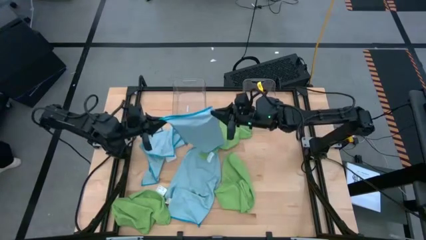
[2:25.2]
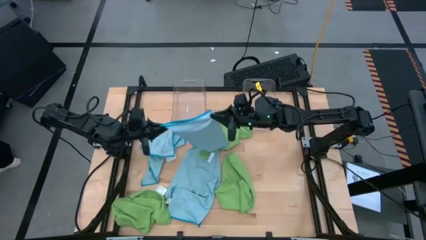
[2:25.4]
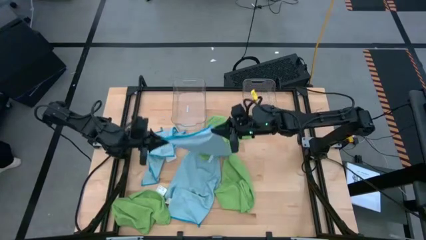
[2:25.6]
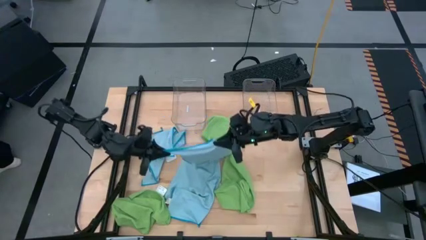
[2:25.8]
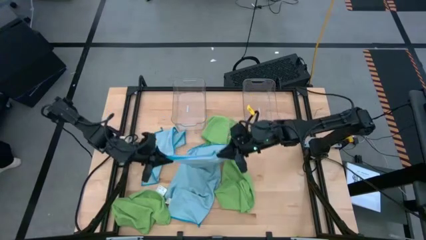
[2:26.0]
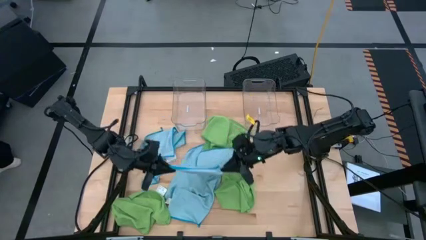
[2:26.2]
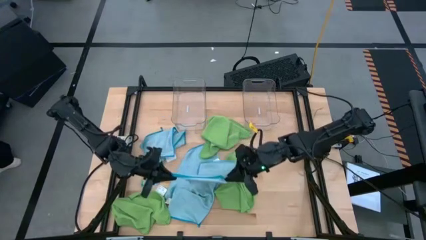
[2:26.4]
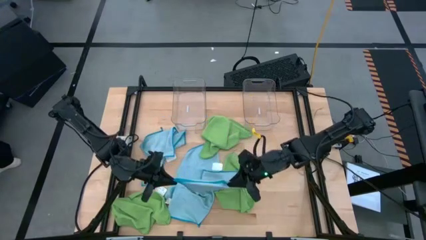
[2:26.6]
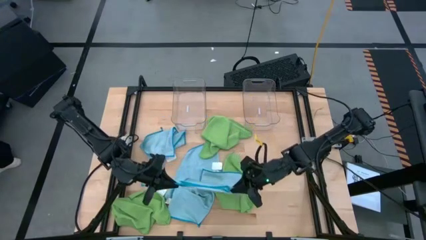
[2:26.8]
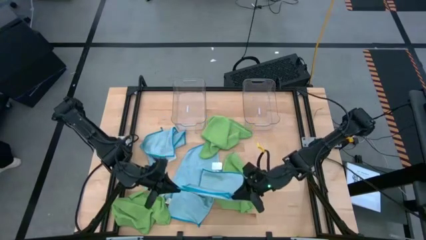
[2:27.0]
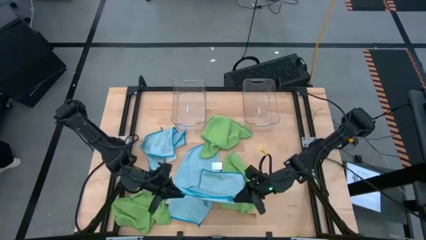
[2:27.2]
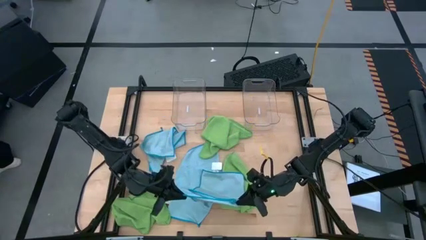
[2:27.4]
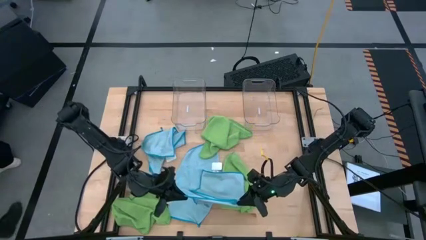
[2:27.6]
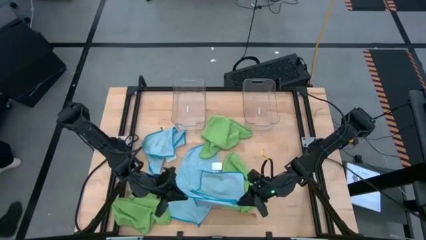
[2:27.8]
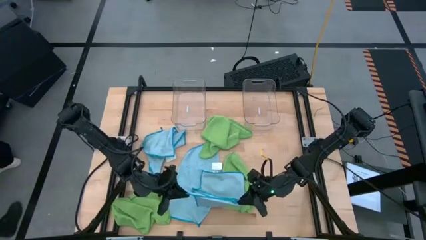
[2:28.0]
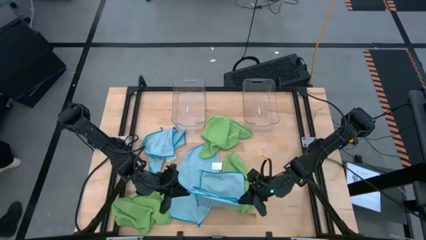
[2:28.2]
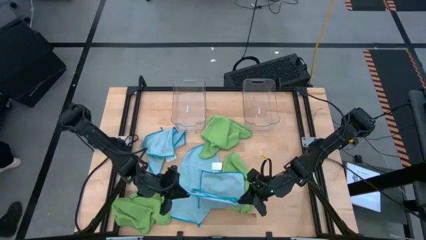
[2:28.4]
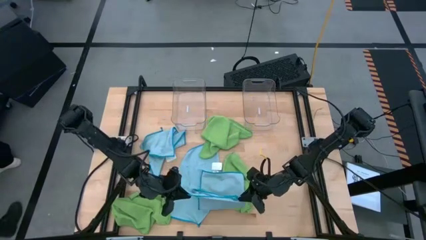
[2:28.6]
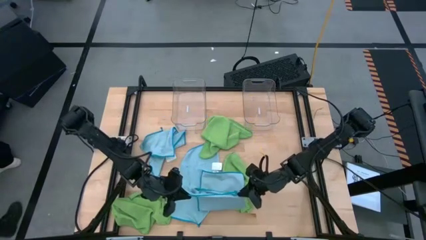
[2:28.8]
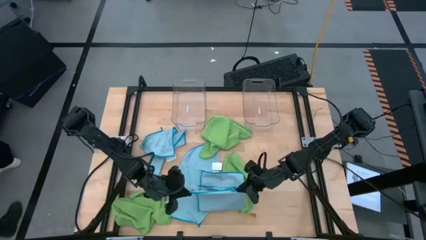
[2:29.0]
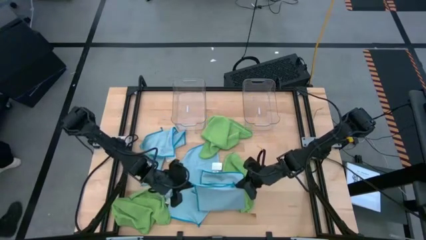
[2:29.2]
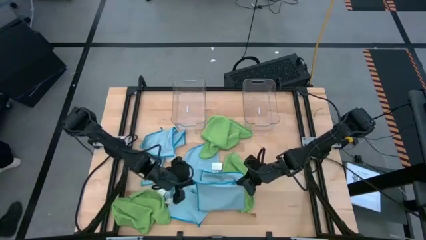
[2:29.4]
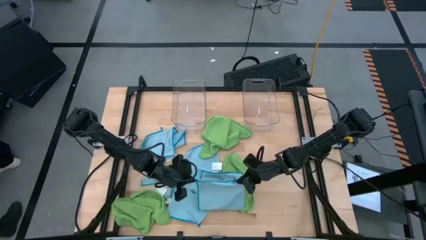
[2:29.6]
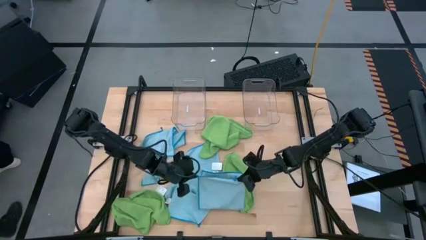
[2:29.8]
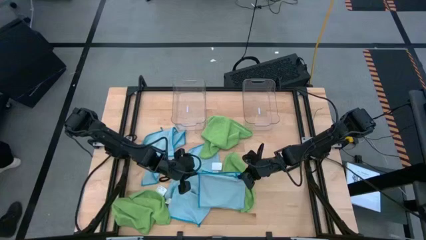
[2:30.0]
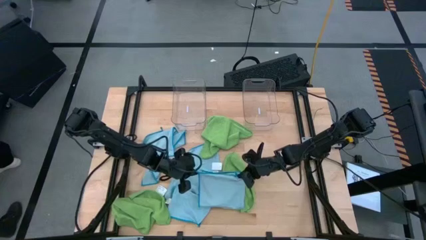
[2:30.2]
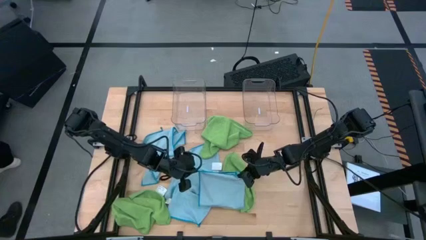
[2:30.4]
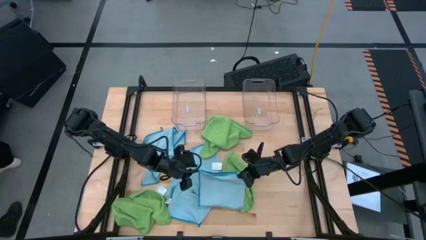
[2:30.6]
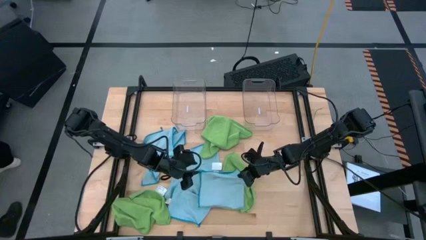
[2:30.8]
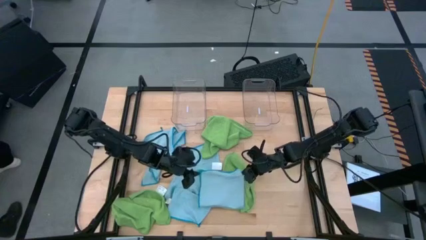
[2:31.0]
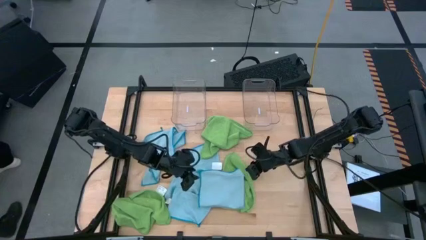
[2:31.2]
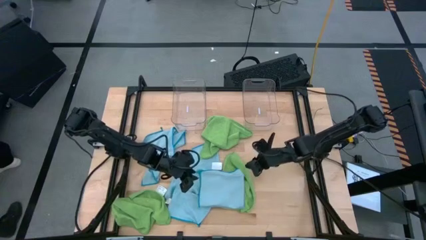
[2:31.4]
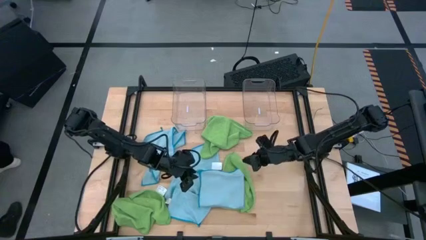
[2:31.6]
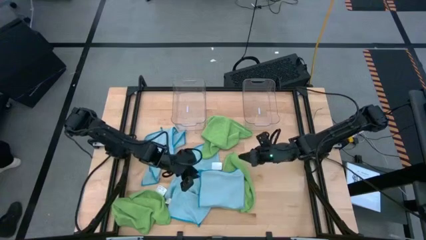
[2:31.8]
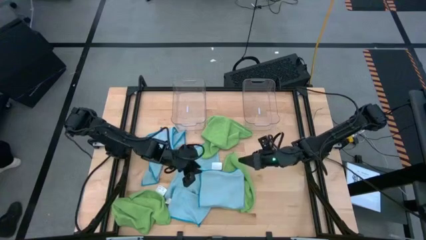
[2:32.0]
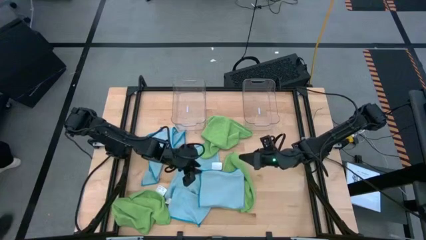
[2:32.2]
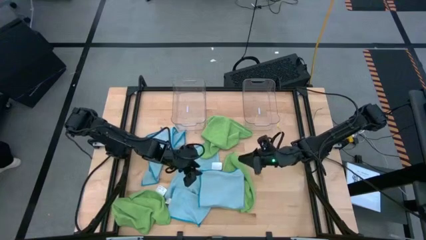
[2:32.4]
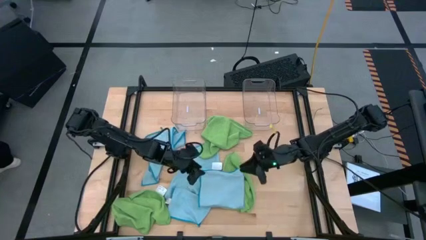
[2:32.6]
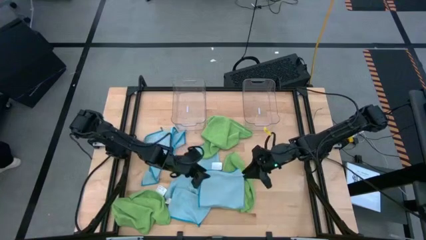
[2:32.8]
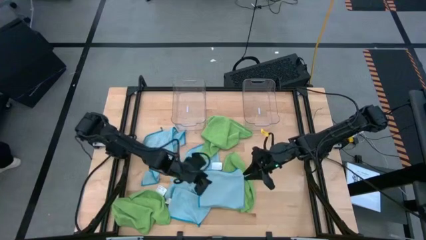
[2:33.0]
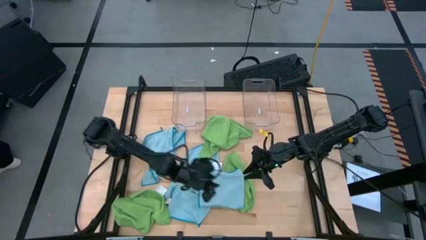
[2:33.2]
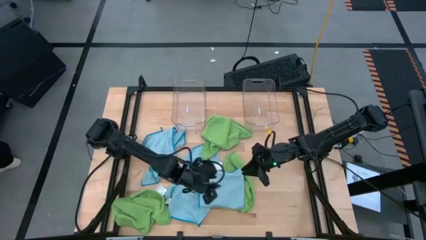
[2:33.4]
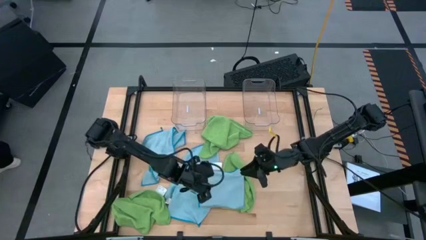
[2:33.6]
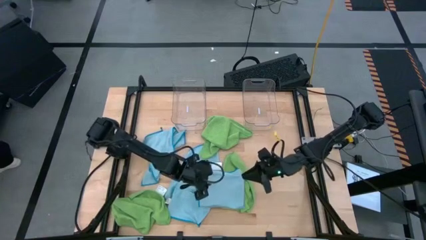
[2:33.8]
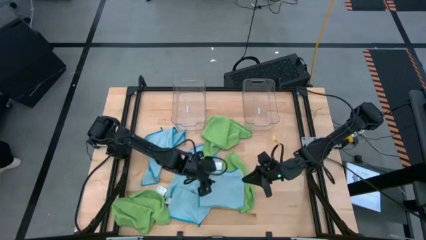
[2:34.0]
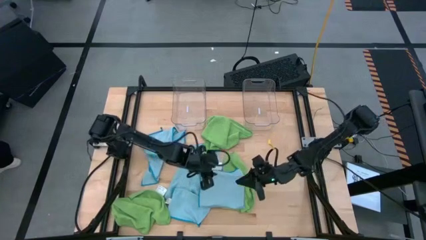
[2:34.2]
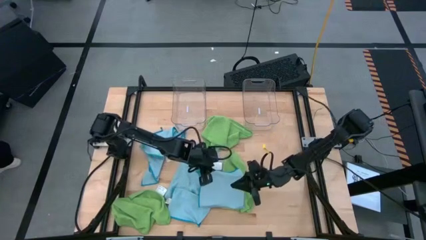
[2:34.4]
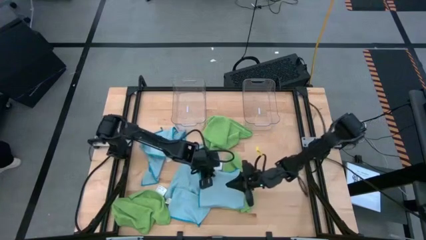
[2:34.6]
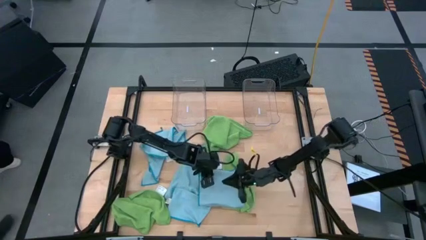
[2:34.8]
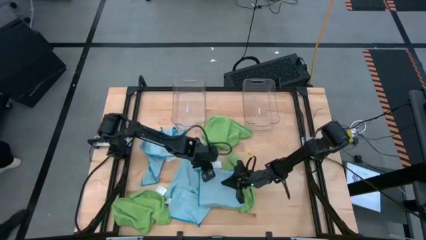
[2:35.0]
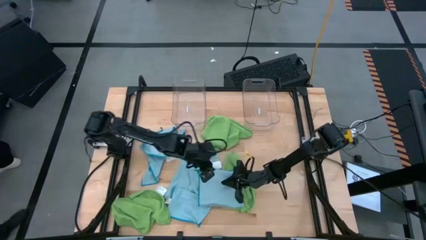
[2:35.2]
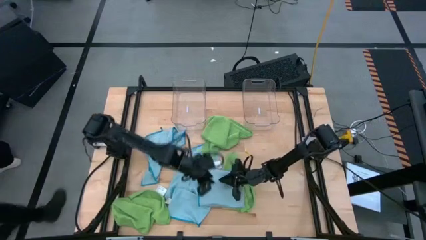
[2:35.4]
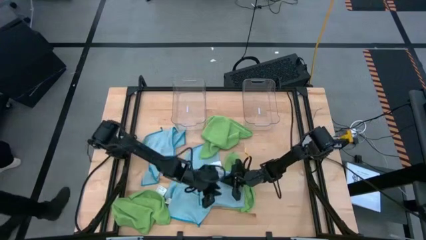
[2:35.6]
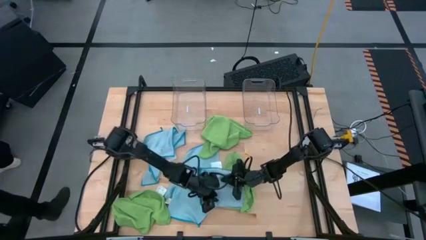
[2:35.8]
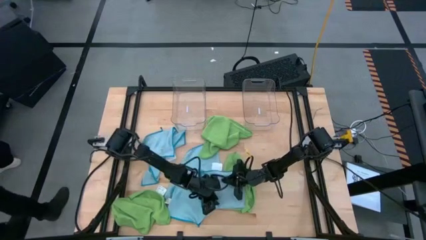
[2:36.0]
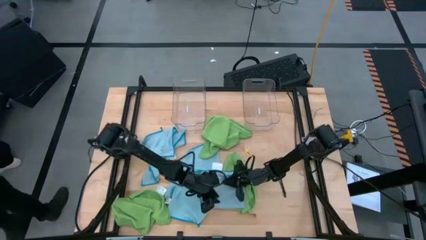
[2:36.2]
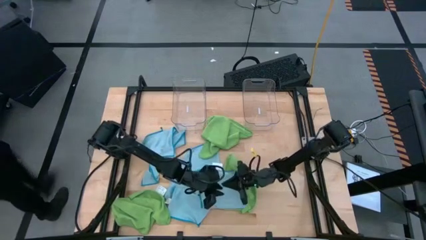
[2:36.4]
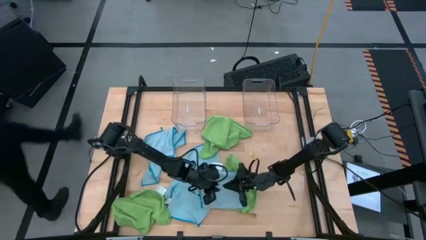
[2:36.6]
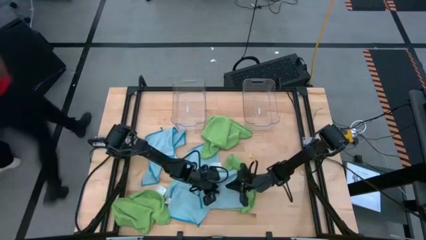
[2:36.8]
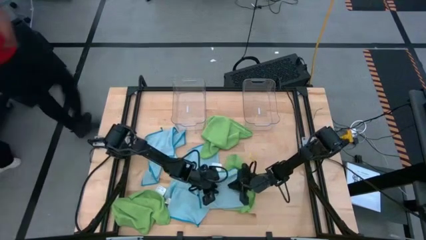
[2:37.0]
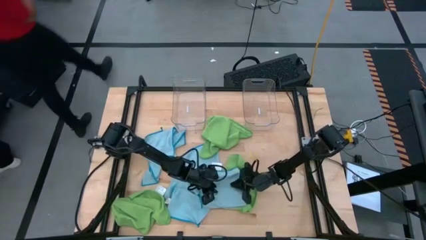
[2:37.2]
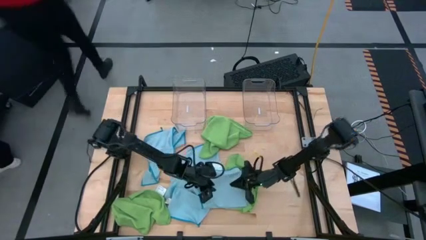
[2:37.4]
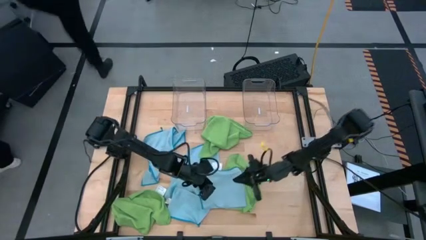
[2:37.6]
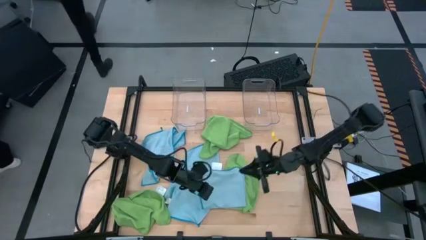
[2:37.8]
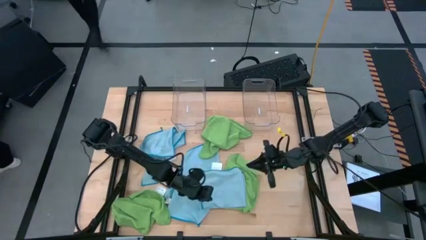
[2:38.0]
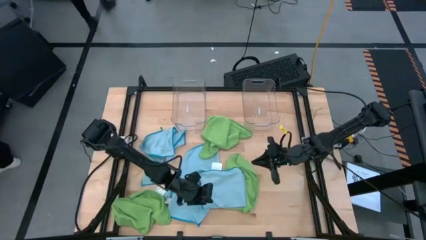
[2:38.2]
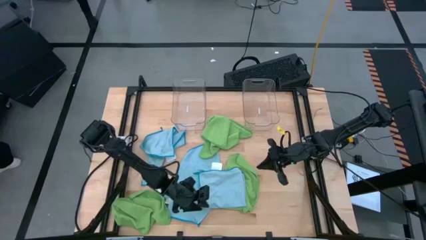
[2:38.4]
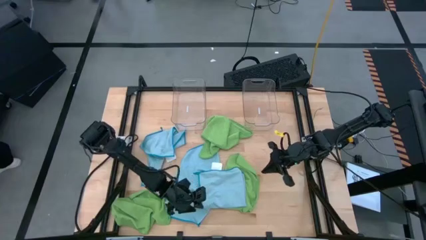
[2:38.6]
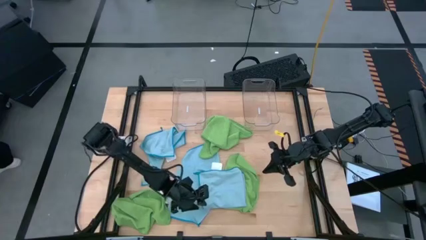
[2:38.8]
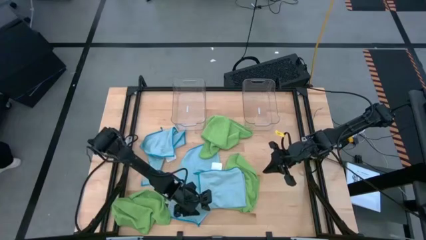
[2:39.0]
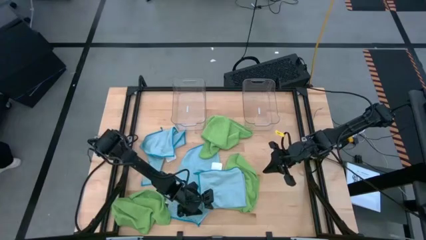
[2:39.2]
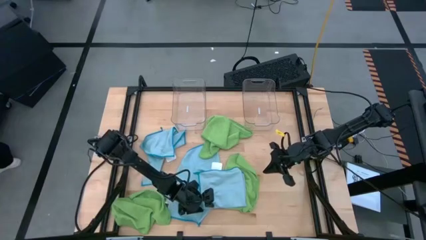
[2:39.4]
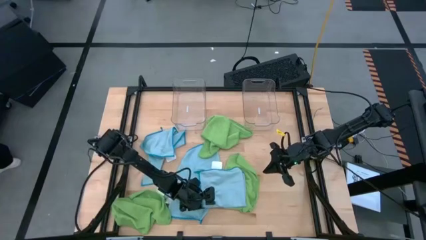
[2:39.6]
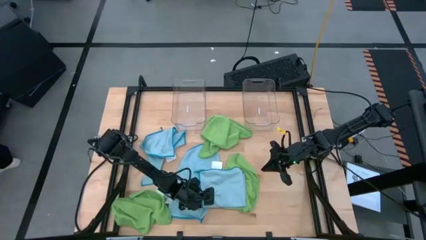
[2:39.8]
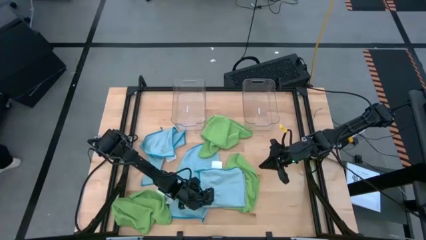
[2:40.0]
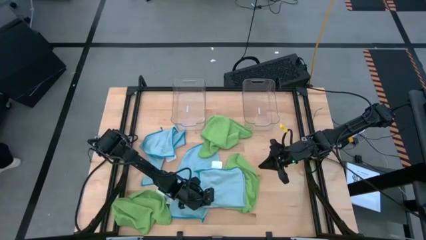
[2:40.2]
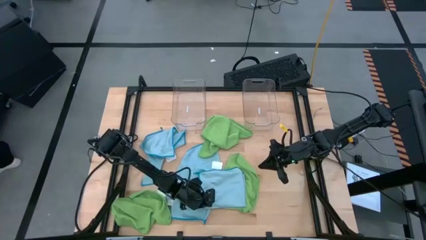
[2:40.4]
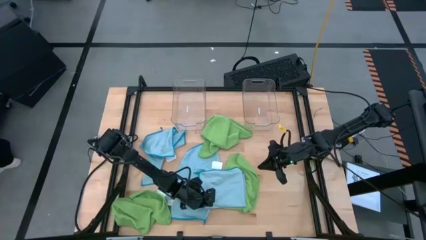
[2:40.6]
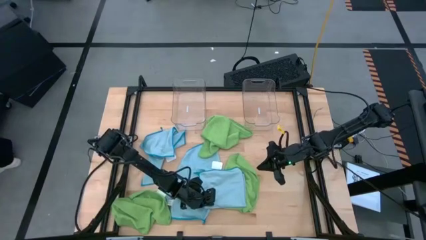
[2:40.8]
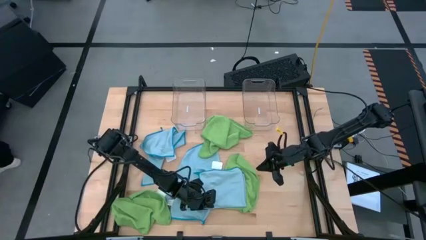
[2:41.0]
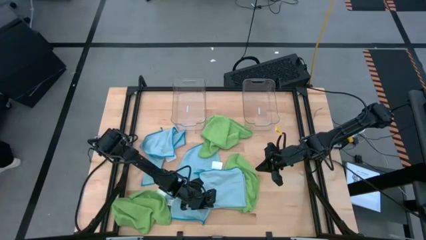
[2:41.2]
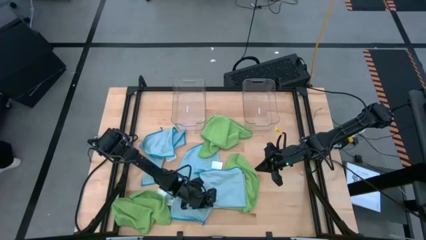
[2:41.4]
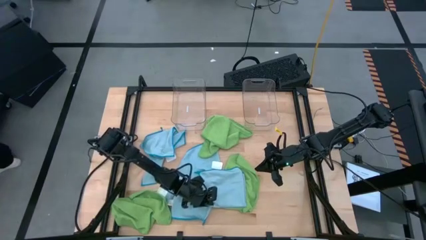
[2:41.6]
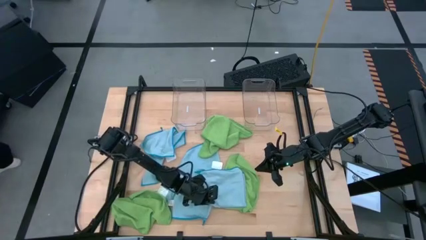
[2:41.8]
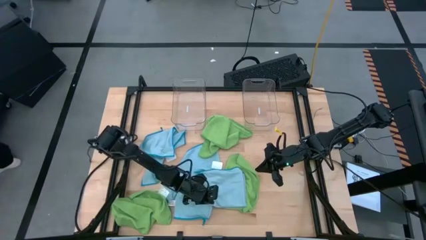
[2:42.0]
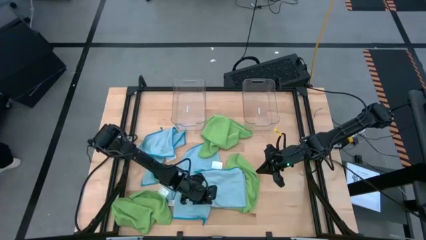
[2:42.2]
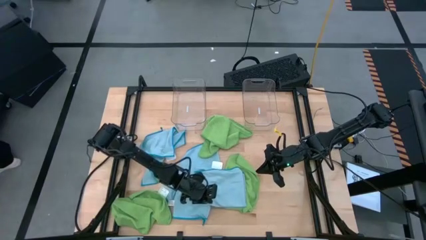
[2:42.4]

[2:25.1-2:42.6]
Task: Fold microfiber towels
Fold the right blue microfiber towel
